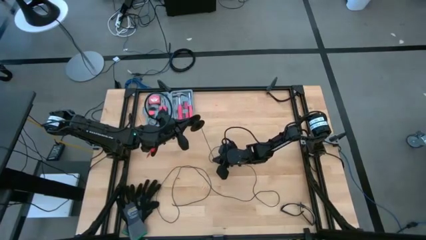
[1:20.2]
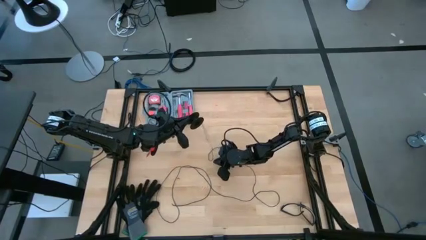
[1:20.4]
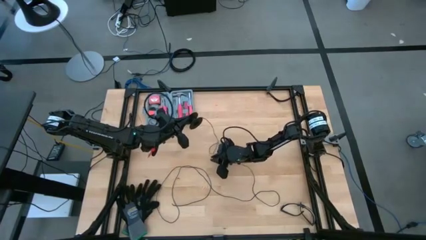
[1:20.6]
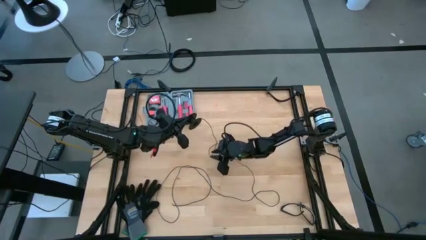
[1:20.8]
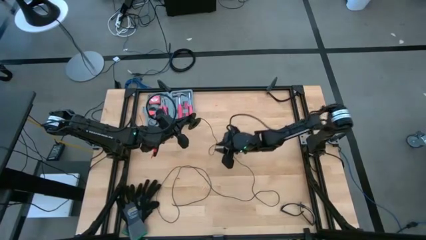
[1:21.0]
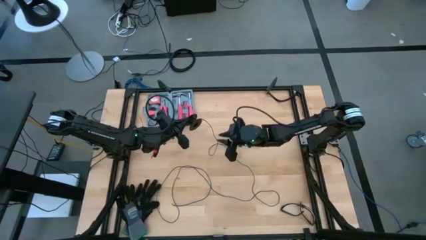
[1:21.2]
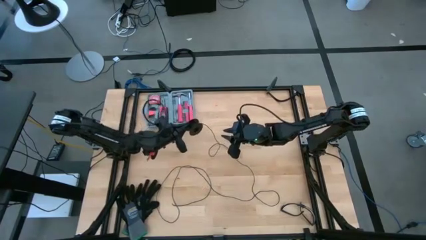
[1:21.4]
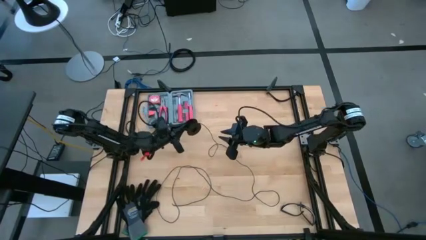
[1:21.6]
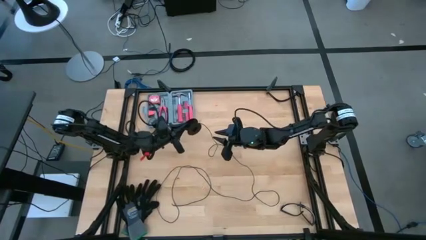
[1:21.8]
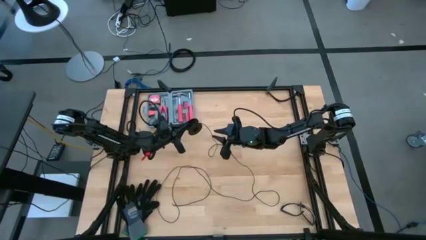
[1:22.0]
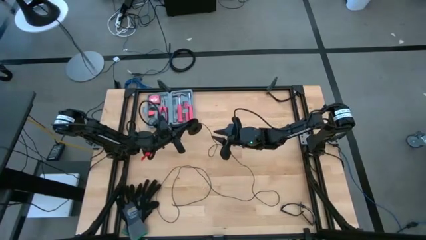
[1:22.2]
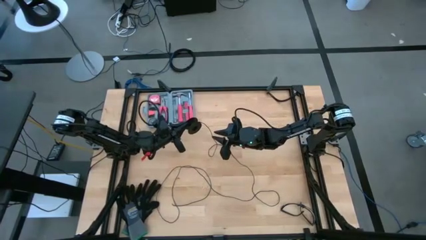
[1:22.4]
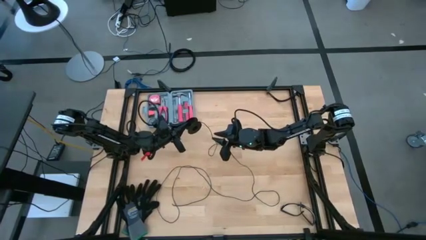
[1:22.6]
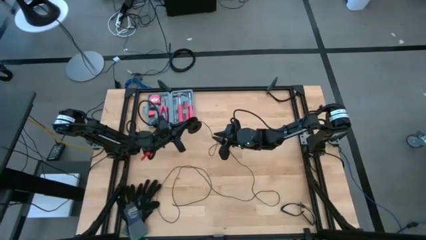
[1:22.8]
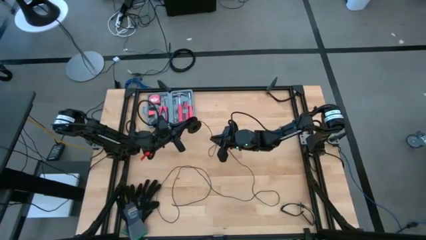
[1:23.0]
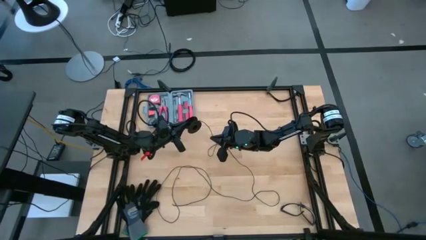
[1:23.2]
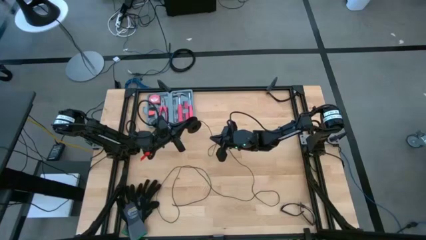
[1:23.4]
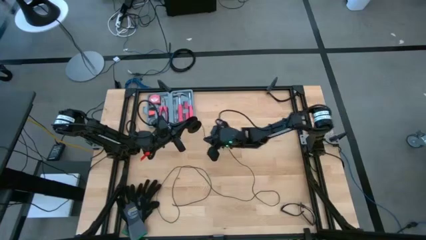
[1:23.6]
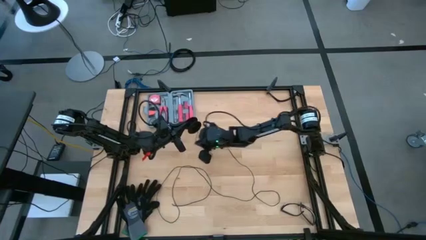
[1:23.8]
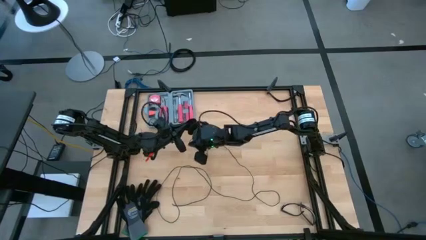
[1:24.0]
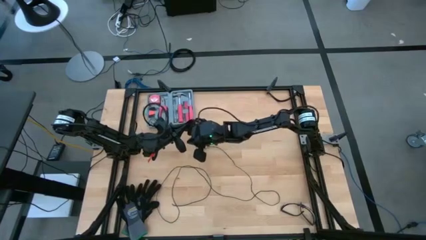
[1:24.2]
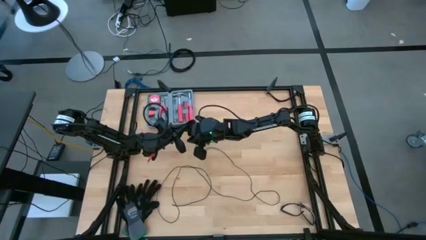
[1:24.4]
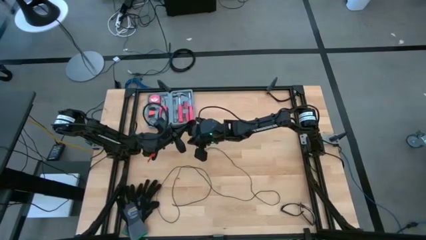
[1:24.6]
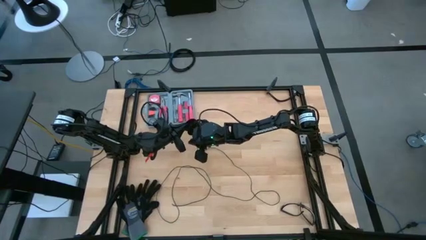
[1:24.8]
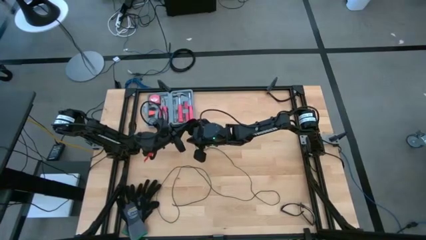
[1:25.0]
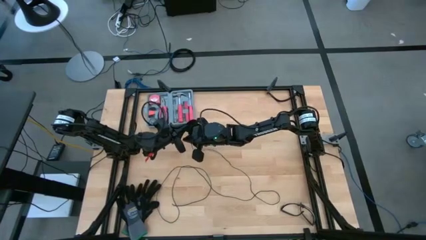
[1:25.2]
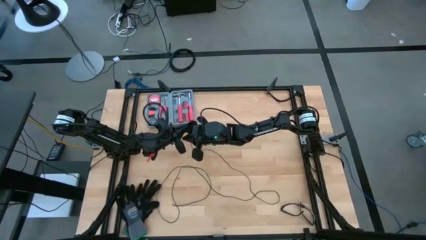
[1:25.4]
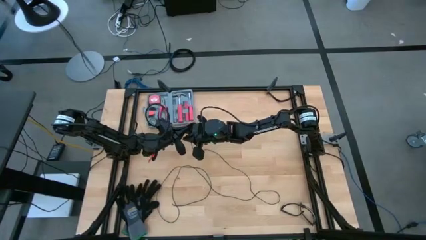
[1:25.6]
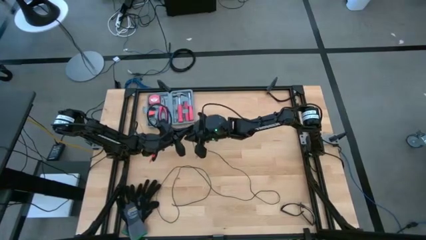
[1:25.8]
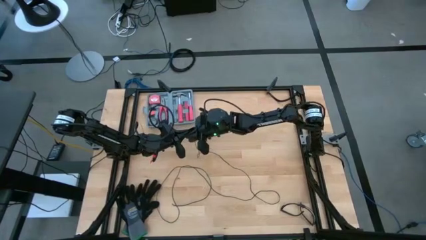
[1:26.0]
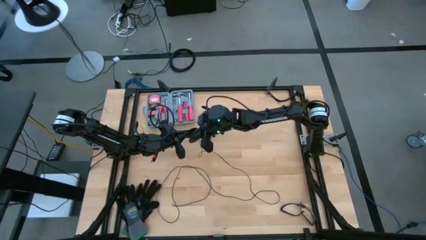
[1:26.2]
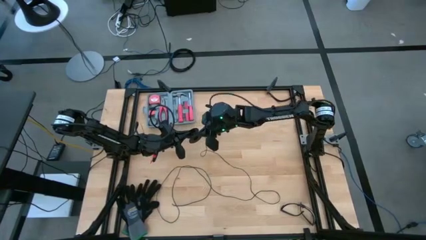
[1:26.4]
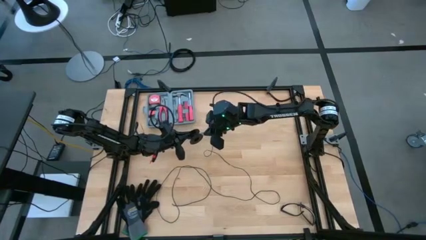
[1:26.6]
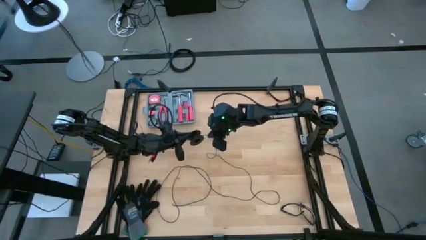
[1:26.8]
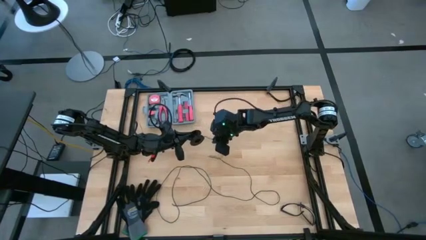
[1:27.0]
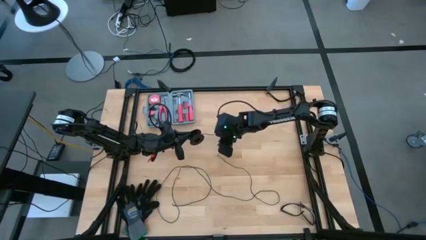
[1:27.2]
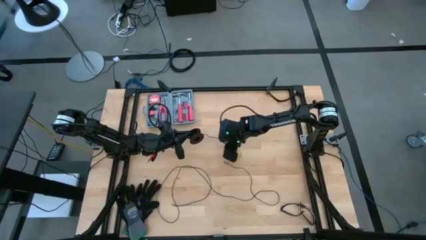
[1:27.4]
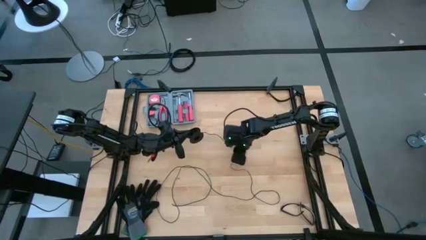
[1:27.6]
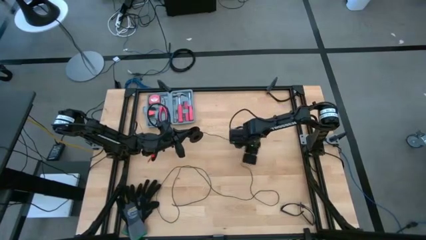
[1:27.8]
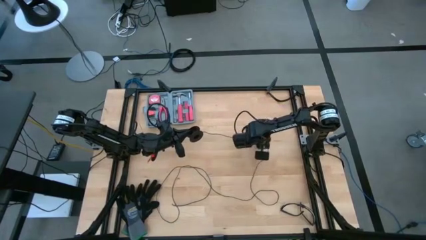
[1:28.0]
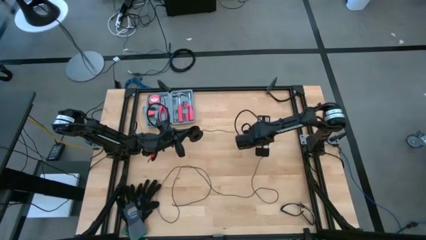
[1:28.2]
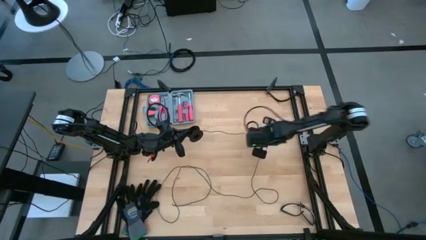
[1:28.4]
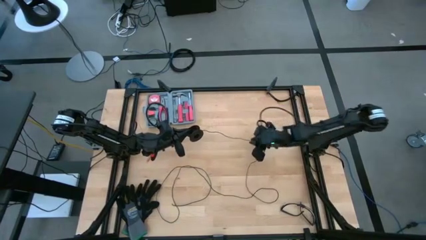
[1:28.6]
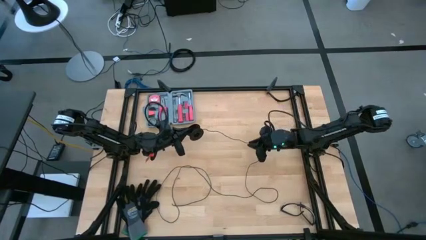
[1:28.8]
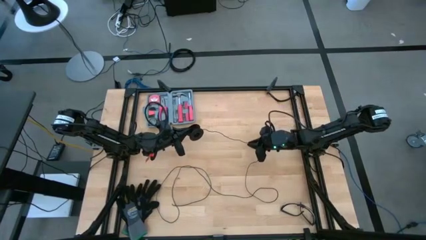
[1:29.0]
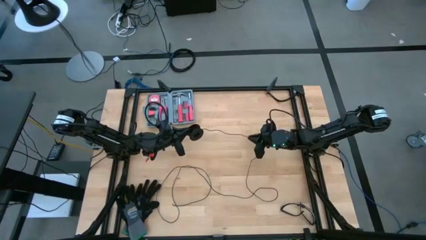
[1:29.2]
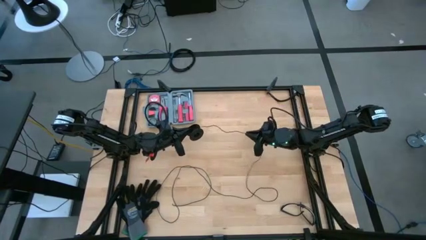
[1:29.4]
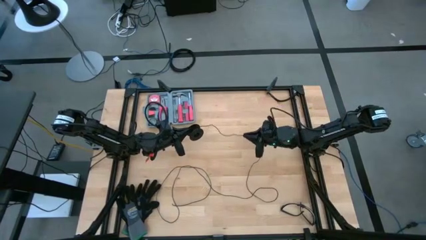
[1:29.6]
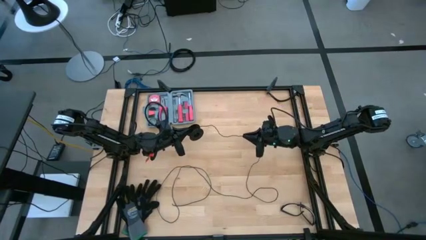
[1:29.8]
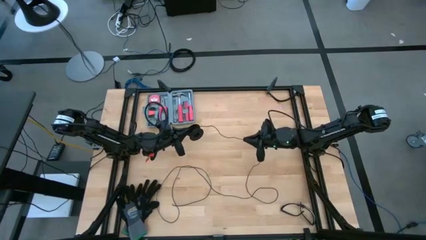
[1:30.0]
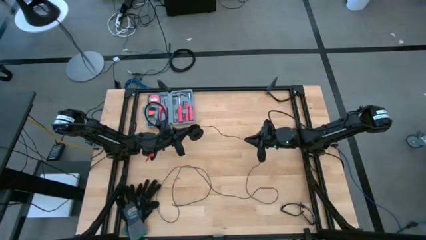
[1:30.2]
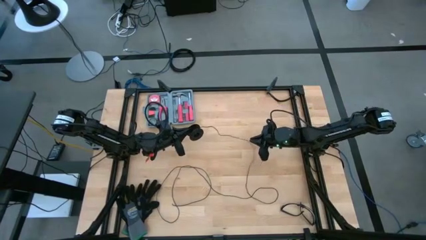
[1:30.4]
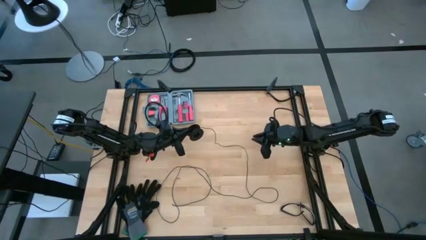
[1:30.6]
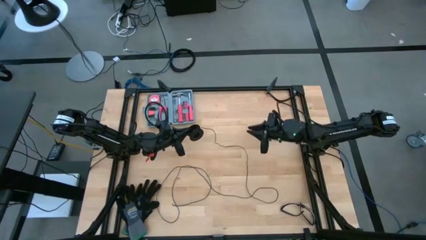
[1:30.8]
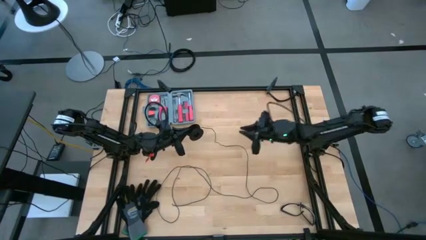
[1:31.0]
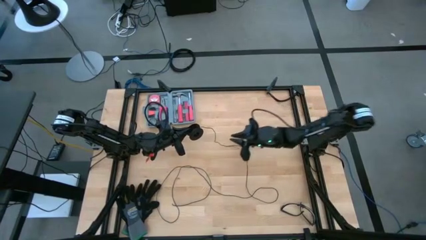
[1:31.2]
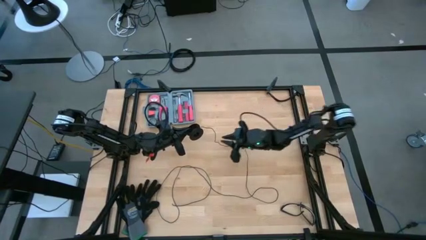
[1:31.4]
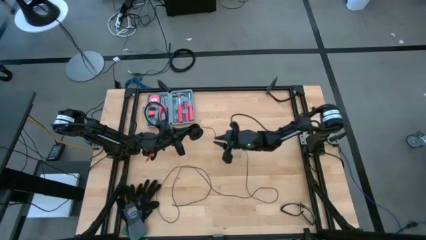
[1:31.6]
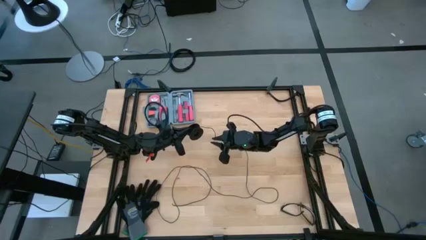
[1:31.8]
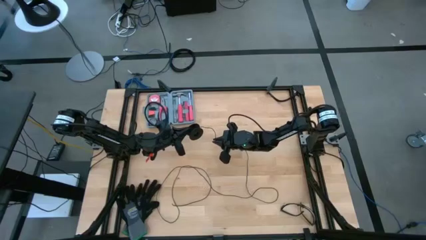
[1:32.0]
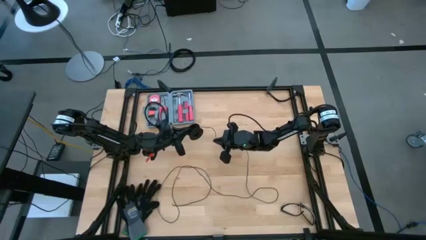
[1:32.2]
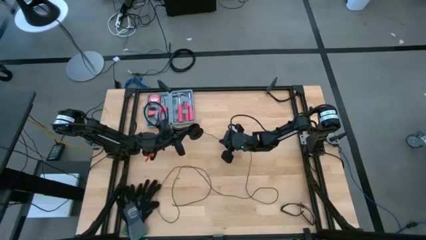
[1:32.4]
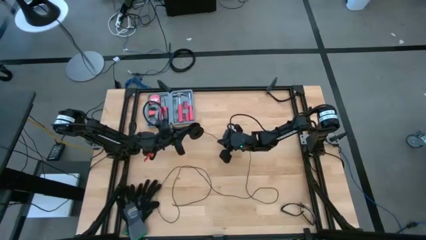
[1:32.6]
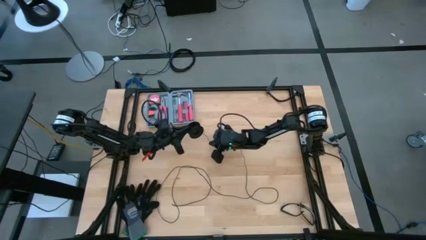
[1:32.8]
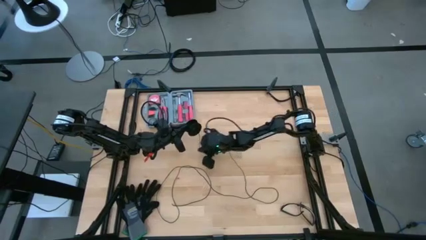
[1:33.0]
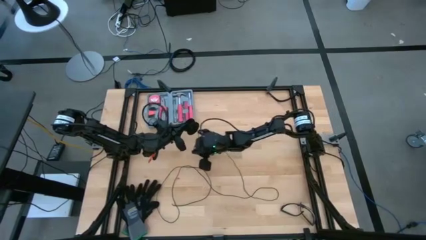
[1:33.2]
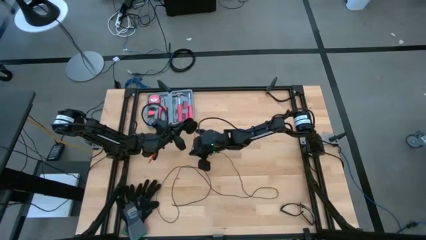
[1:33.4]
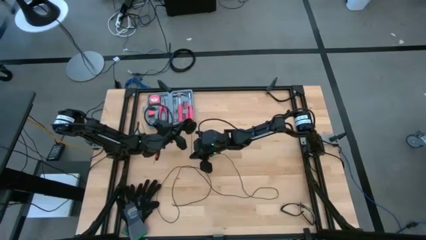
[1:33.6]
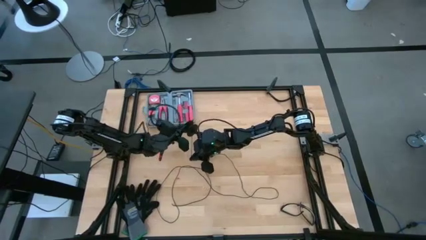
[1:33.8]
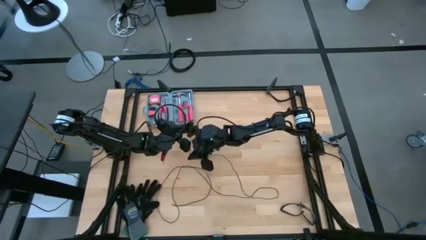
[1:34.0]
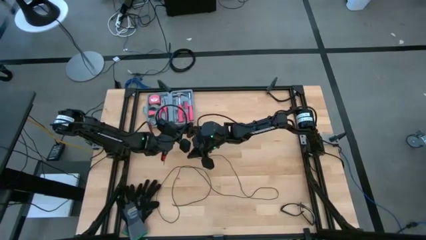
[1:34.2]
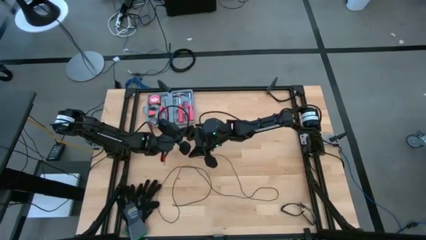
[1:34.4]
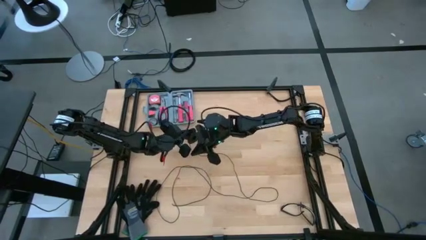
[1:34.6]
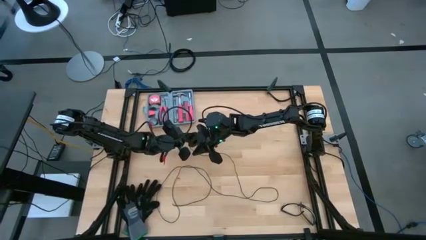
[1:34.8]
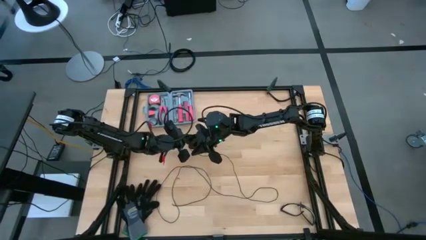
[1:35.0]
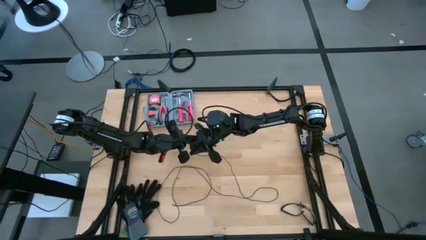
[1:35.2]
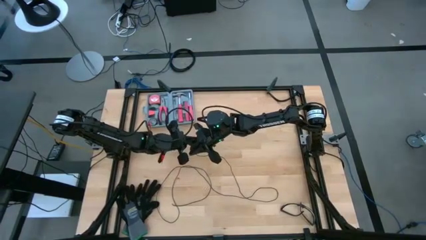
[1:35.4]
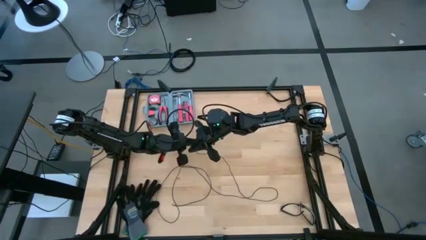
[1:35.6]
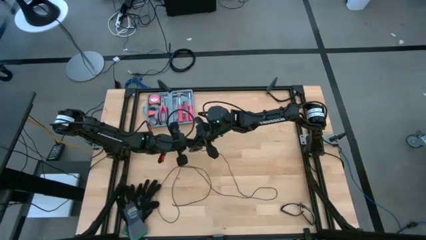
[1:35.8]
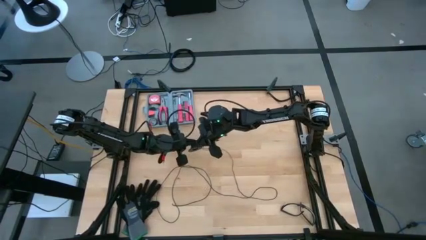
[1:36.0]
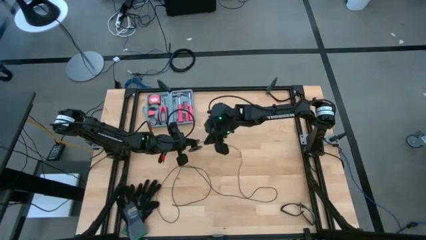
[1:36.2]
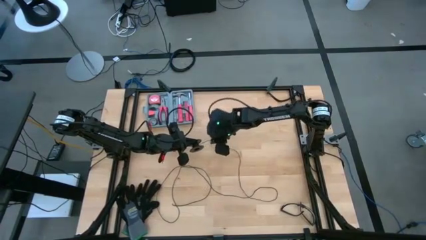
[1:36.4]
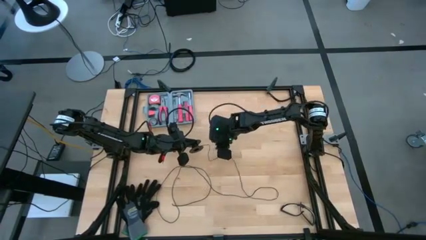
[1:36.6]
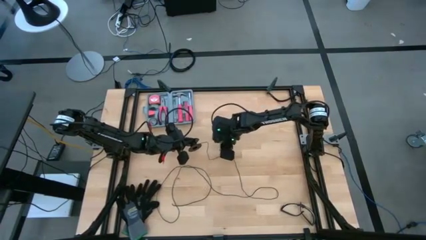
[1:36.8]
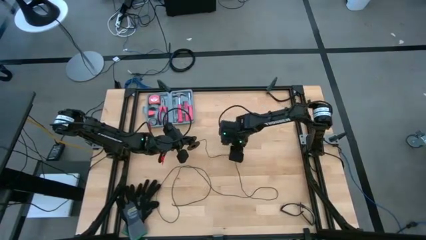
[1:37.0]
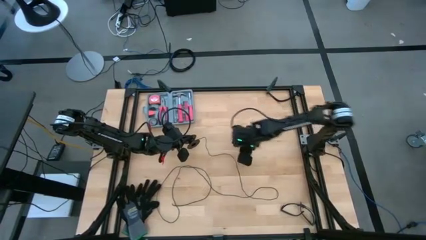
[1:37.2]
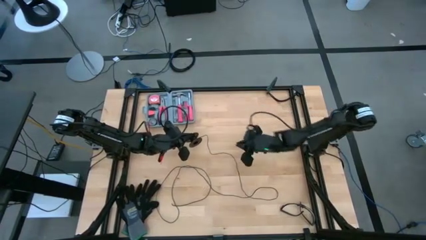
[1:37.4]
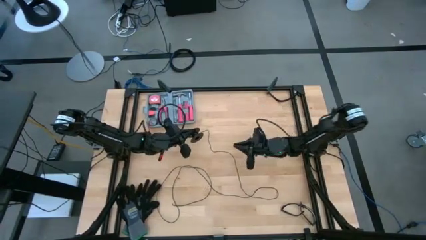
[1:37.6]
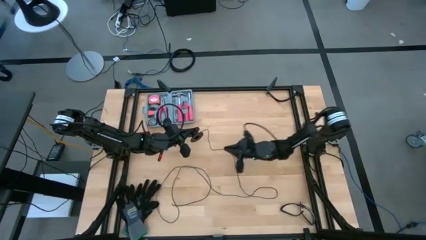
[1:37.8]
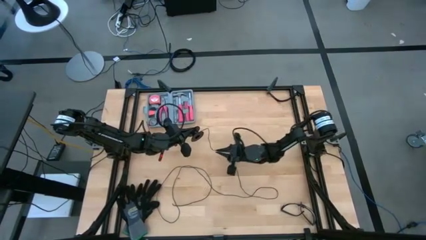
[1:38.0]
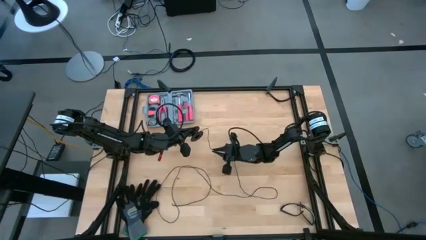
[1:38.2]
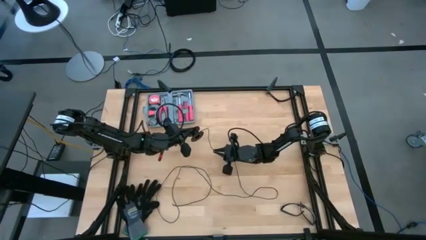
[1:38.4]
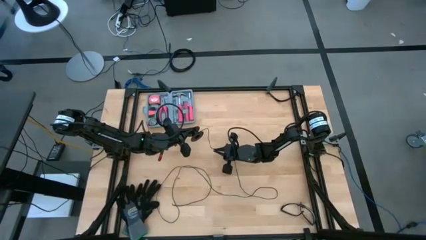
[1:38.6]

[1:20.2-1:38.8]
Task: Coil cords
Coil the black wire onto the spool
